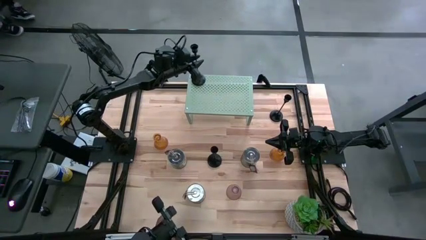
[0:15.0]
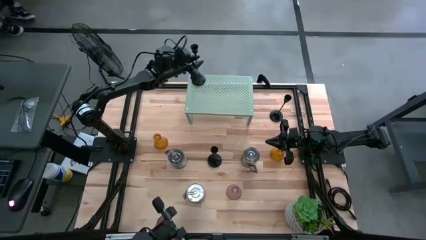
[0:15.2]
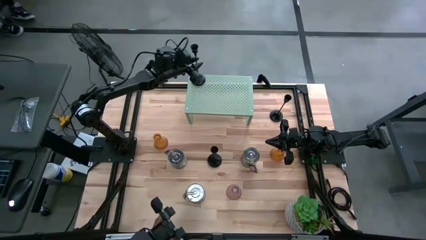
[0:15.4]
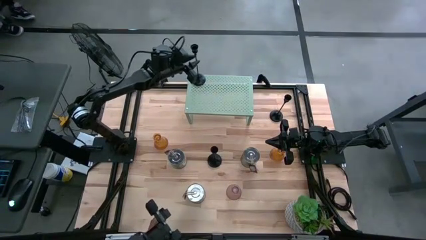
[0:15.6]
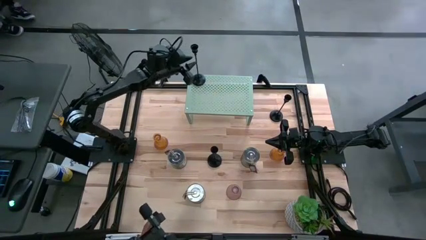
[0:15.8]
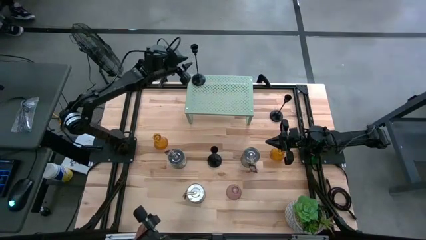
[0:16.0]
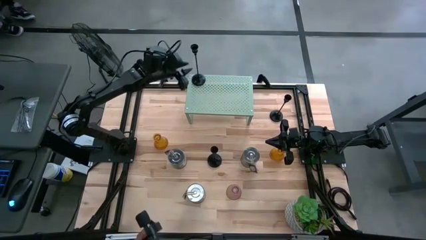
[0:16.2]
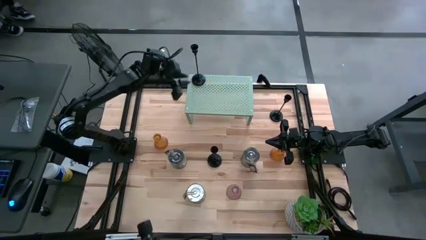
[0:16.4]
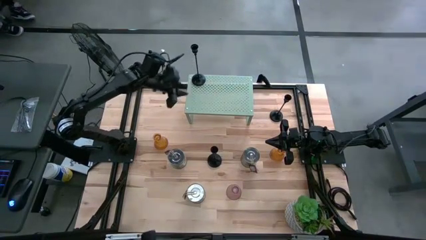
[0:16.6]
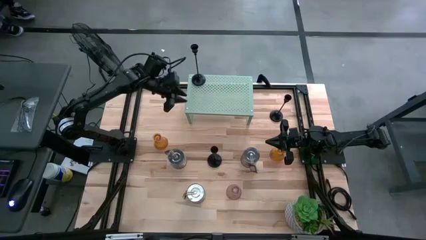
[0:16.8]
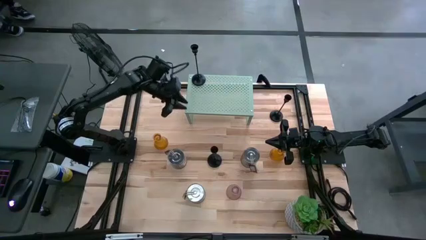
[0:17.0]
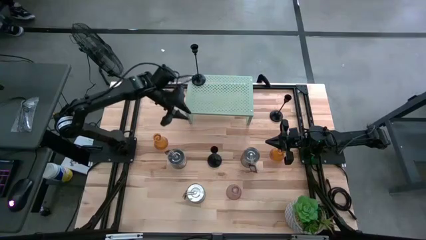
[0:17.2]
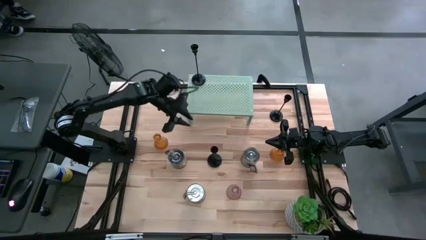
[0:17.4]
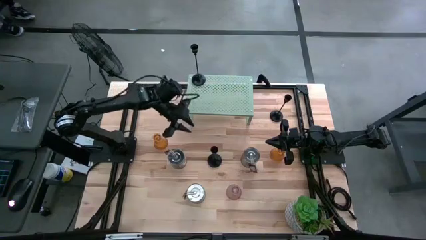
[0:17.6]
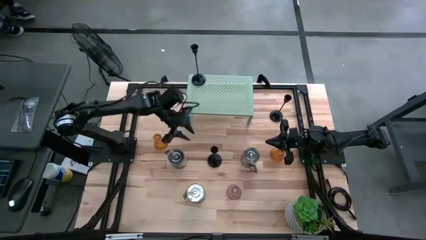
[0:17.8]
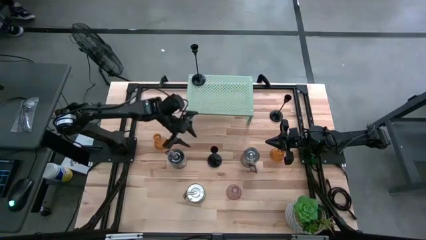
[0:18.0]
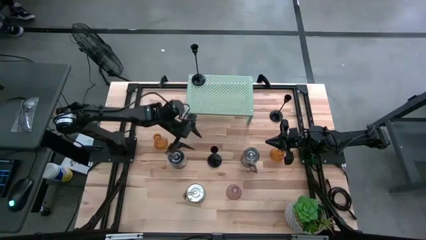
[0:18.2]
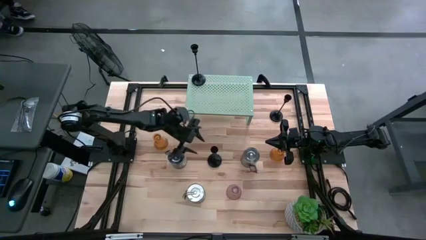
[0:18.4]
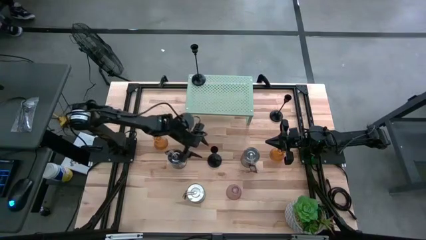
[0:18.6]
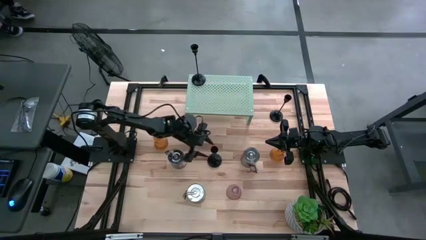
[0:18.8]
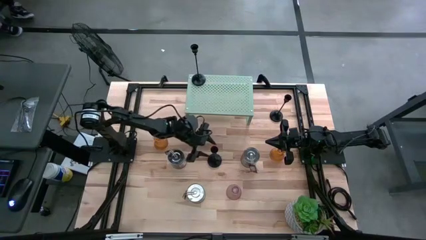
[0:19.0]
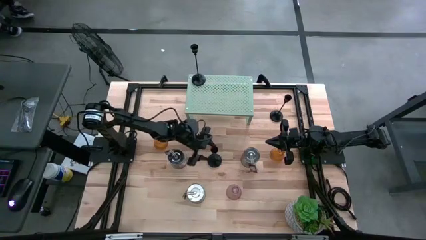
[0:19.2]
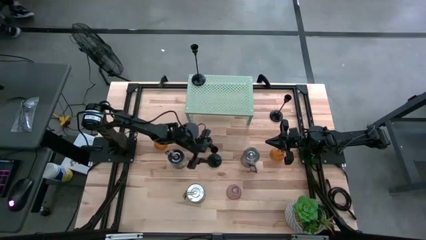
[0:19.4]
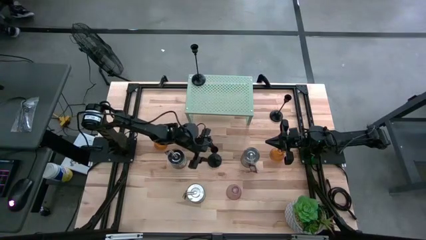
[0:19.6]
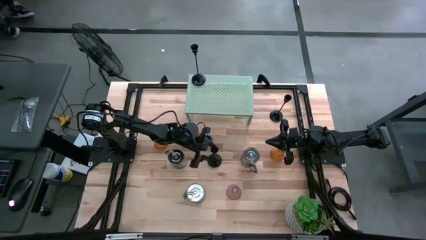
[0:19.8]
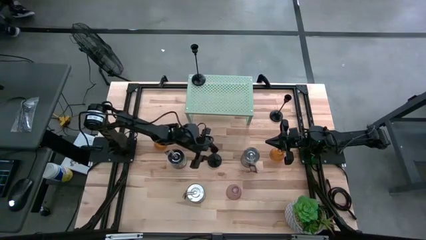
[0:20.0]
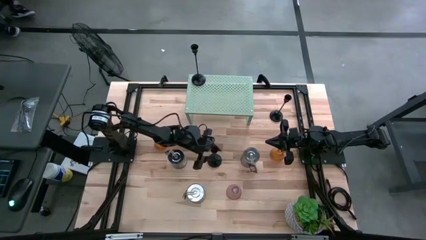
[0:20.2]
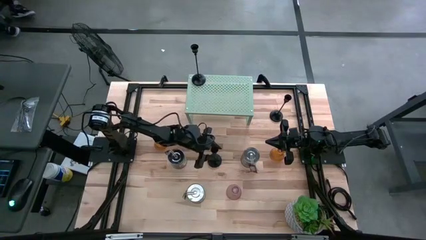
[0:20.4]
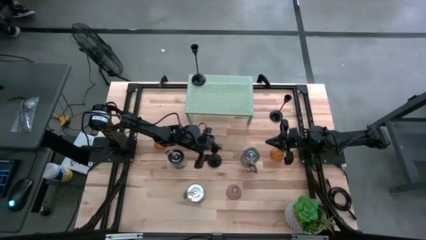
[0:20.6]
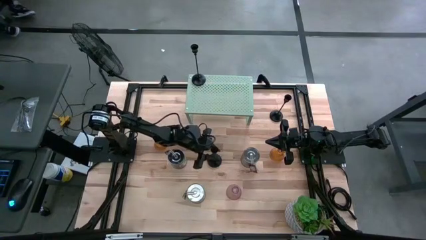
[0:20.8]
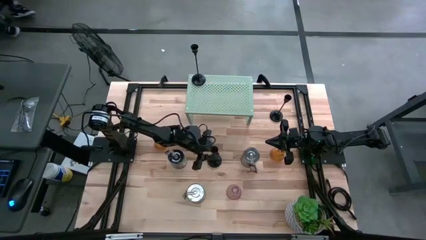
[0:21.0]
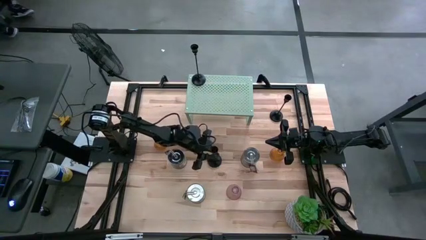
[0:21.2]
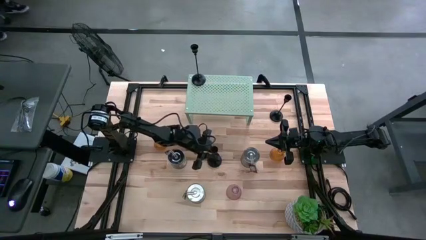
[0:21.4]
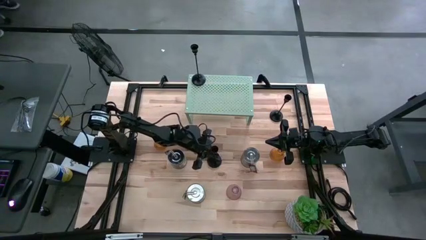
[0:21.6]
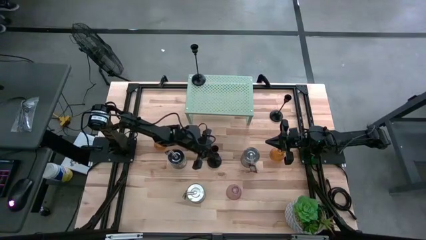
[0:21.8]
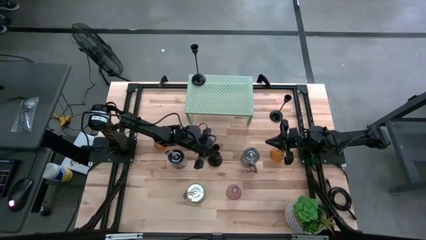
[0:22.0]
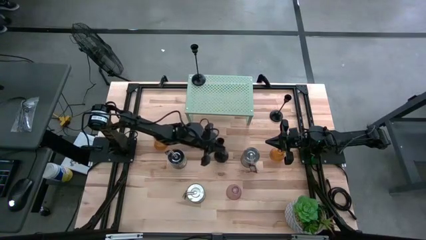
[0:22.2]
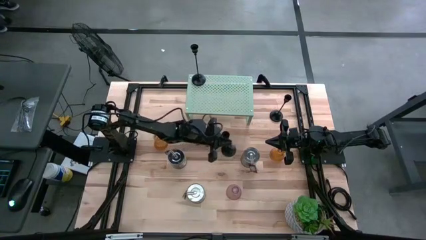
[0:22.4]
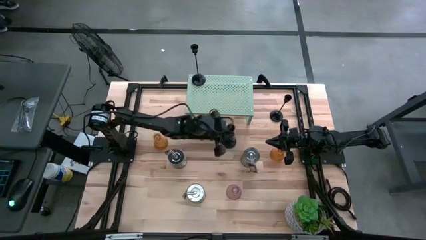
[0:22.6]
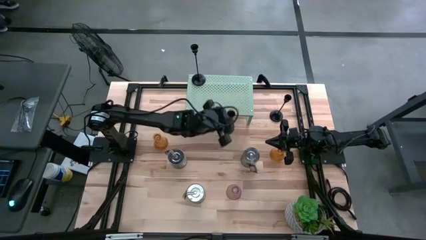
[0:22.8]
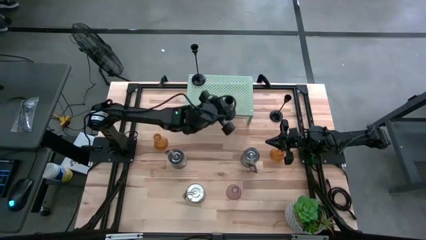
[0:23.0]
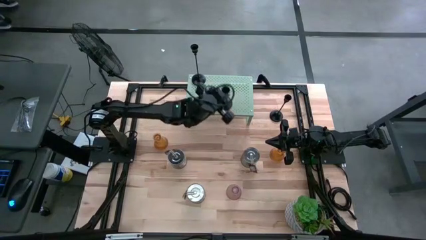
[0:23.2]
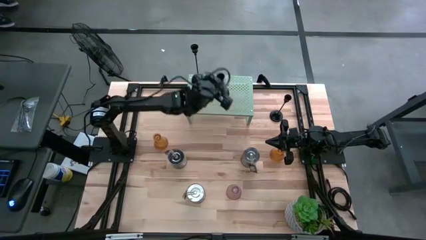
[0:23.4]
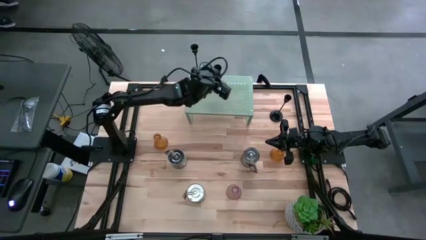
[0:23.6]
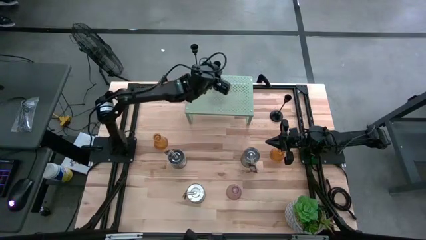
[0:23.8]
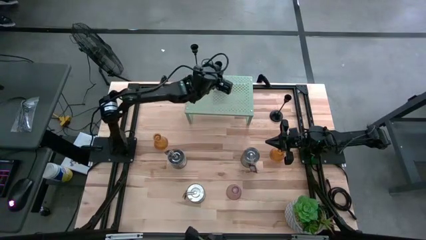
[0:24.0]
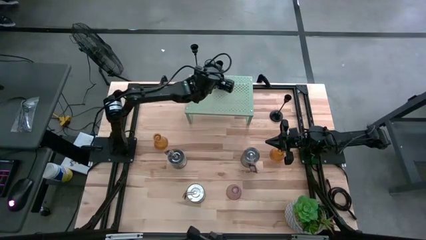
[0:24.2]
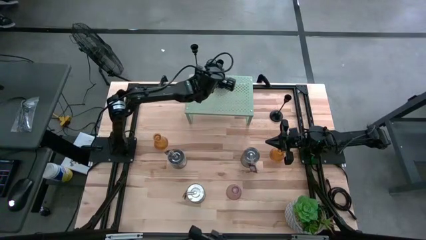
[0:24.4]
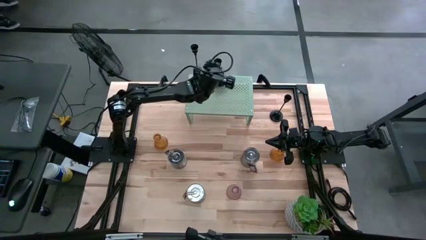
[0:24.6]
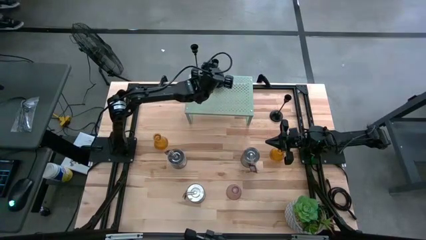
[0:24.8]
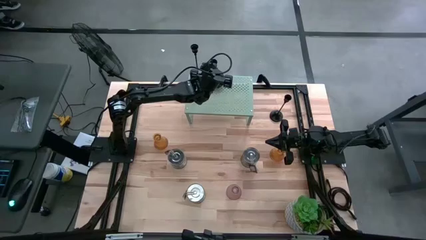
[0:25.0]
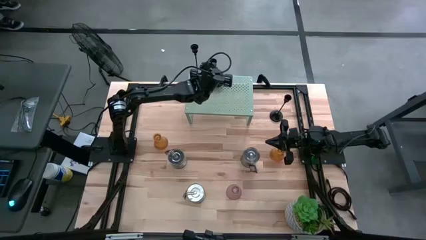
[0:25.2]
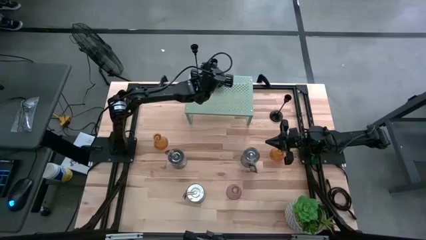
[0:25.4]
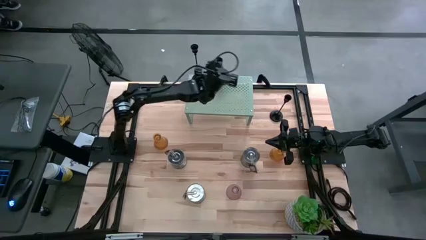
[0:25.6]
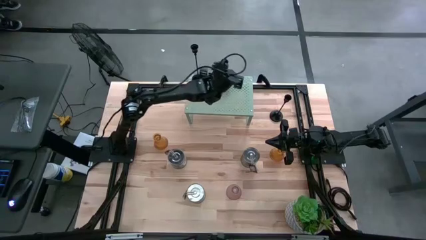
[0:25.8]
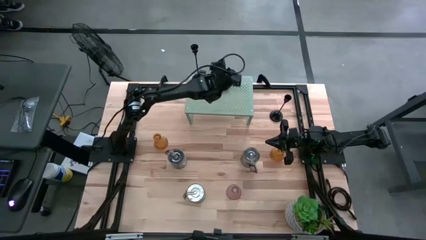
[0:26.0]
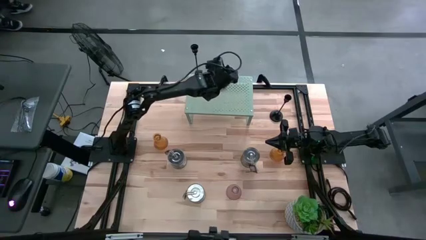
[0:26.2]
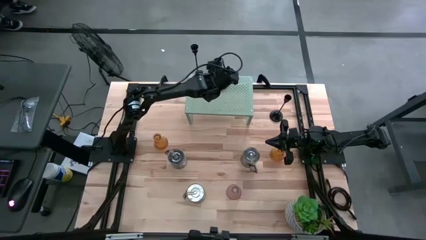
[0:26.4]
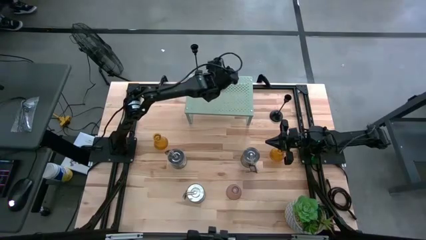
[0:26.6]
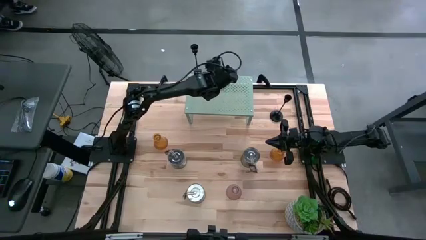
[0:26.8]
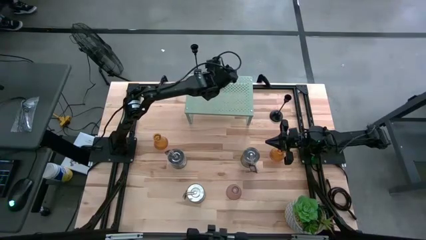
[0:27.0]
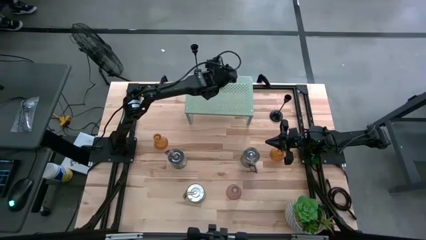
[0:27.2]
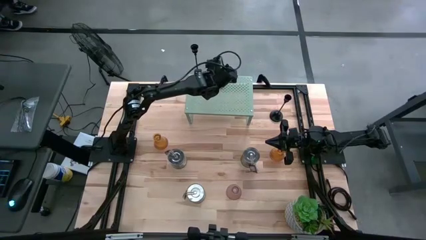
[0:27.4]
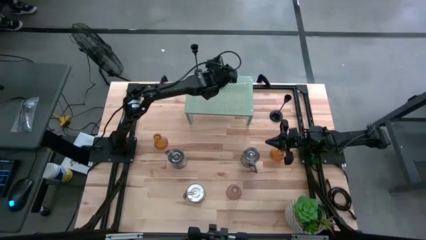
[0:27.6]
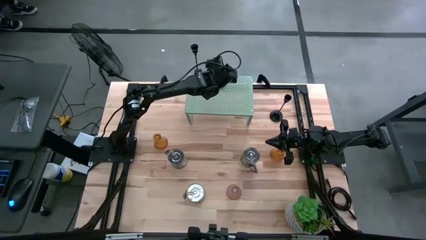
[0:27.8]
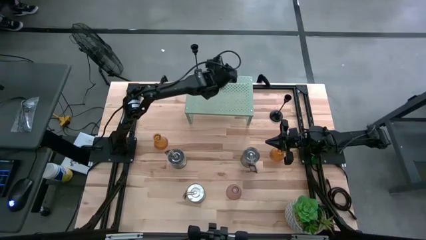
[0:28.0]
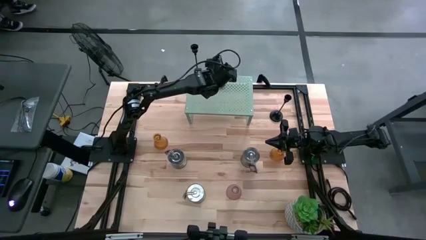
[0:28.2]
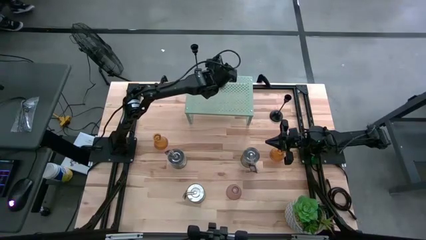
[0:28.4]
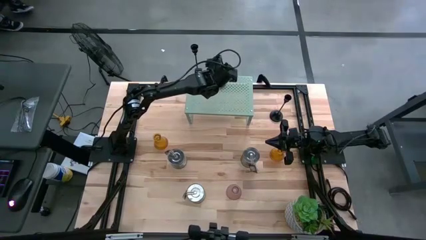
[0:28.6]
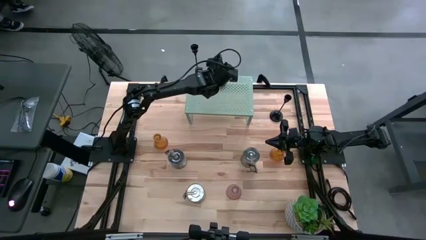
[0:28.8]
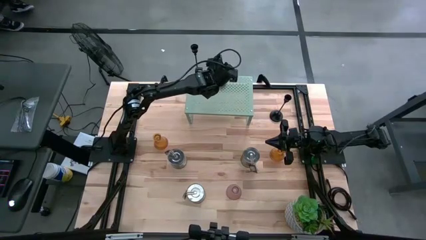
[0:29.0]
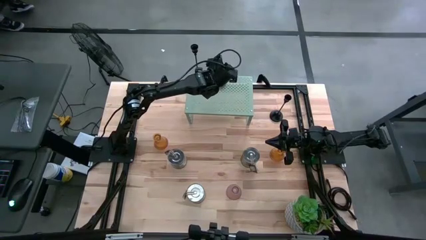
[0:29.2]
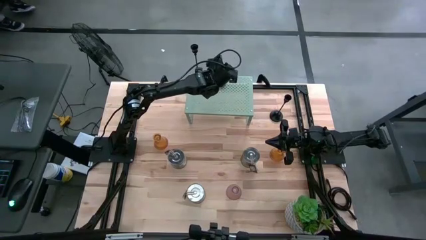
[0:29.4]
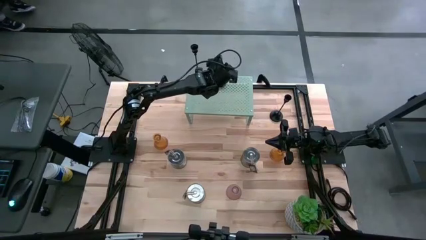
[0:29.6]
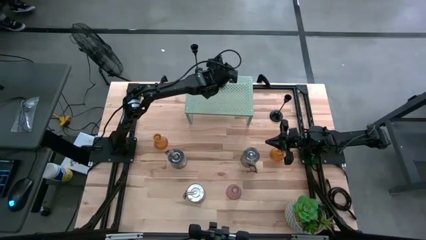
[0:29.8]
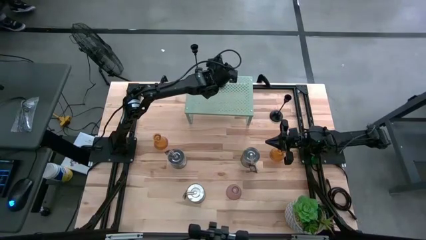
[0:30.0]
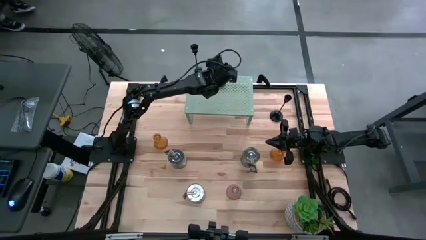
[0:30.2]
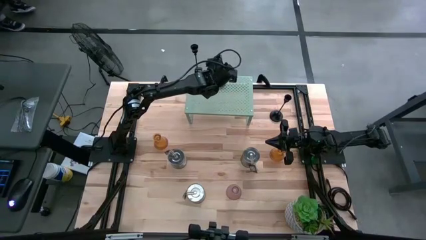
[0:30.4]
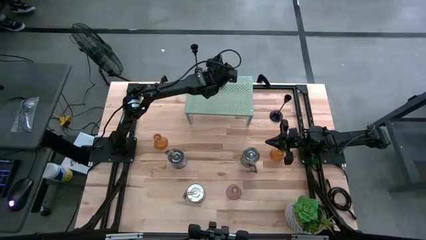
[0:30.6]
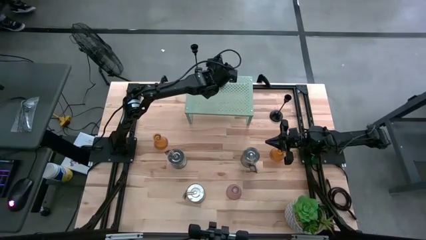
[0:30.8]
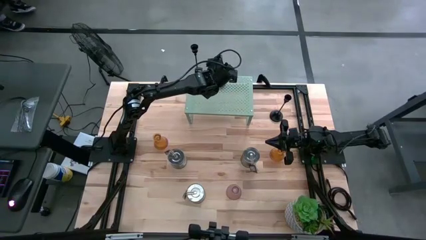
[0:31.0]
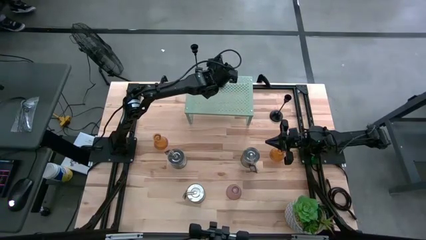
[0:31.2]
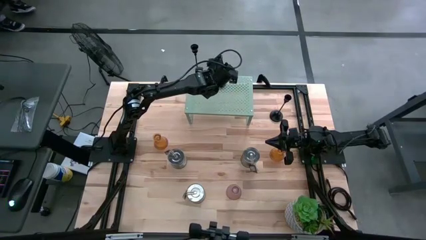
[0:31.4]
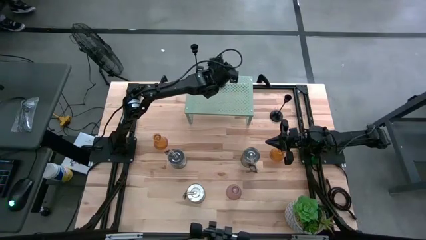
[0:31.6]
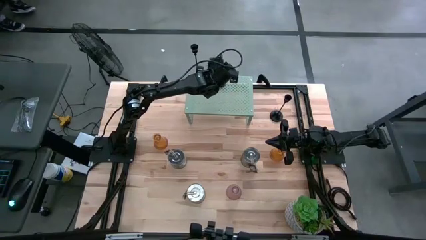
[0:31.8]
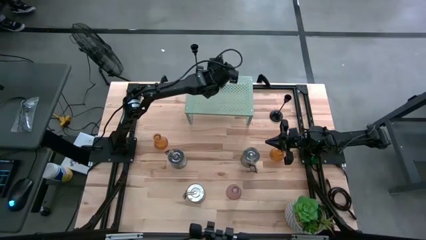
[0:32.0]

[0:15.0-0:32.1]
Task: Pick & Place candle stick holders
Put the left black candle holder on the shelf
